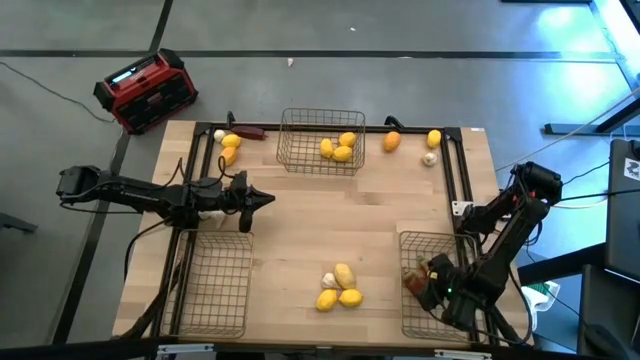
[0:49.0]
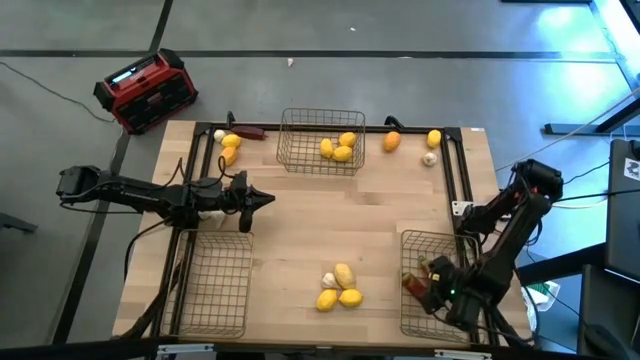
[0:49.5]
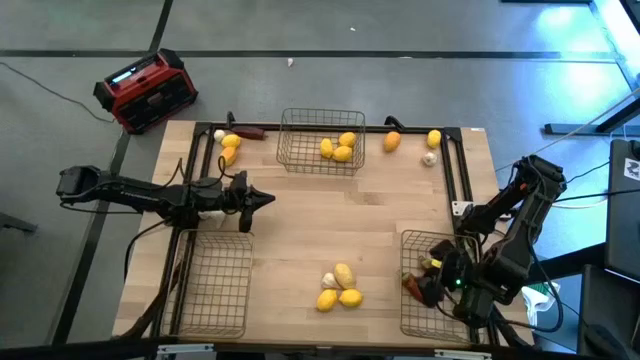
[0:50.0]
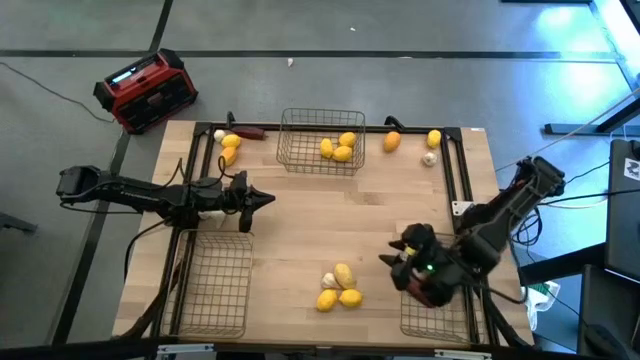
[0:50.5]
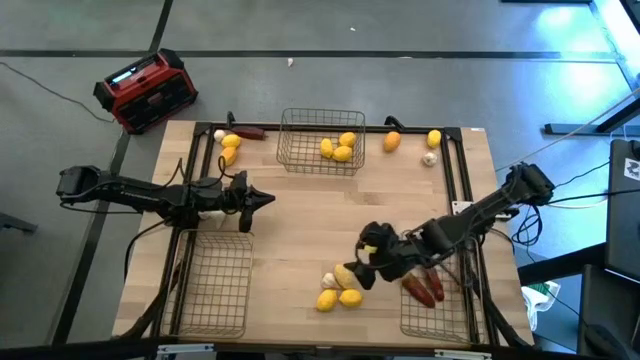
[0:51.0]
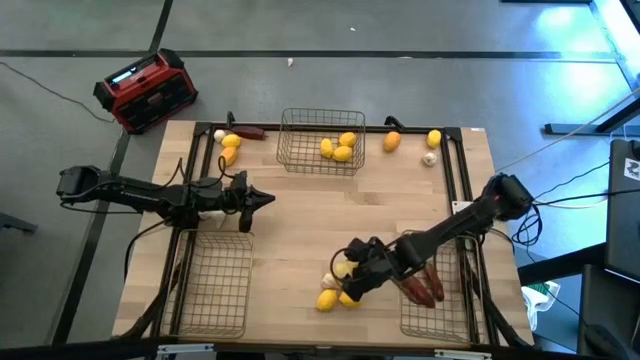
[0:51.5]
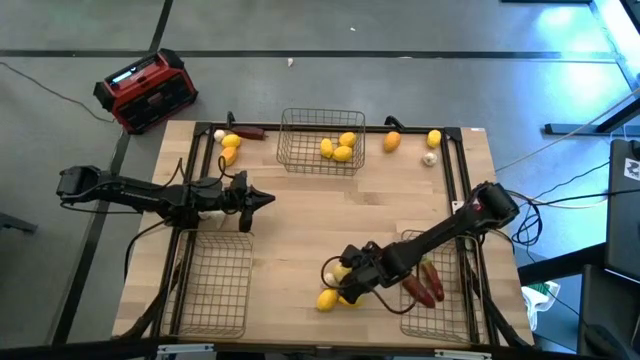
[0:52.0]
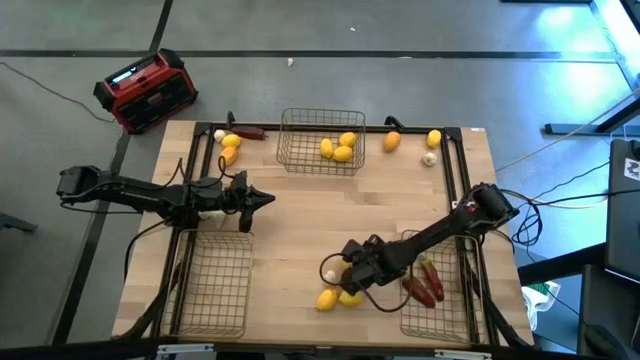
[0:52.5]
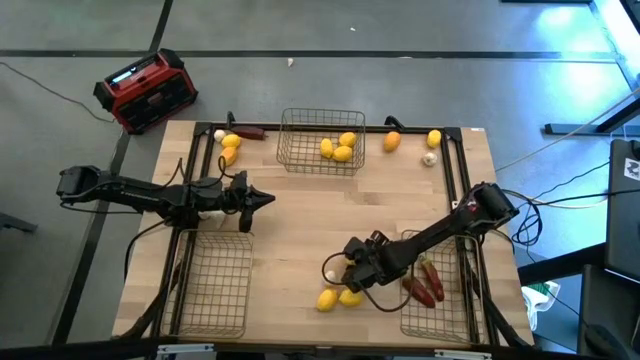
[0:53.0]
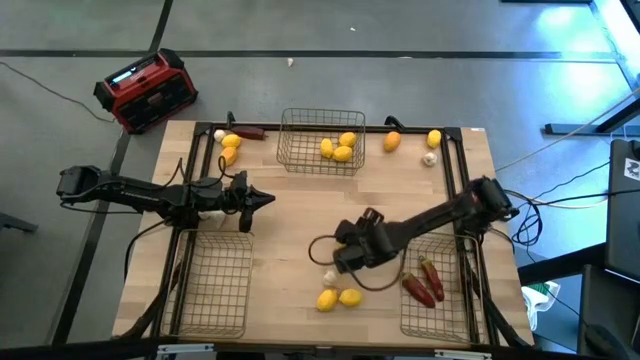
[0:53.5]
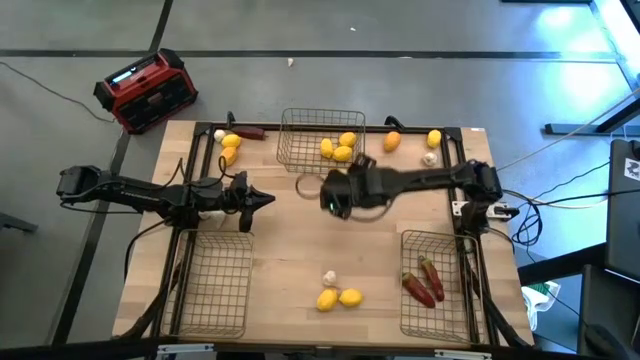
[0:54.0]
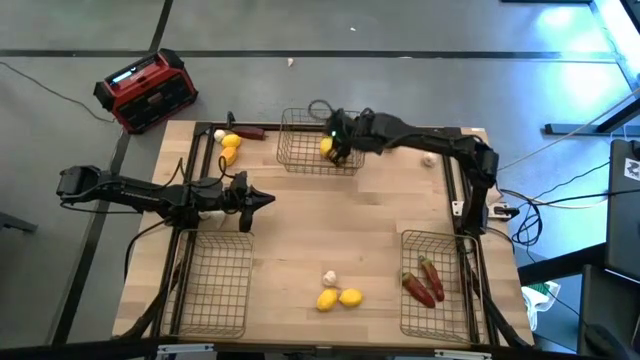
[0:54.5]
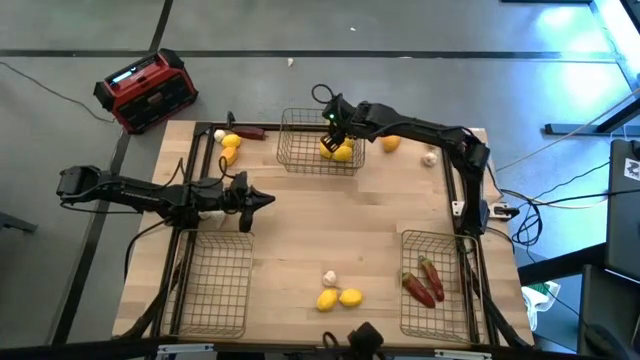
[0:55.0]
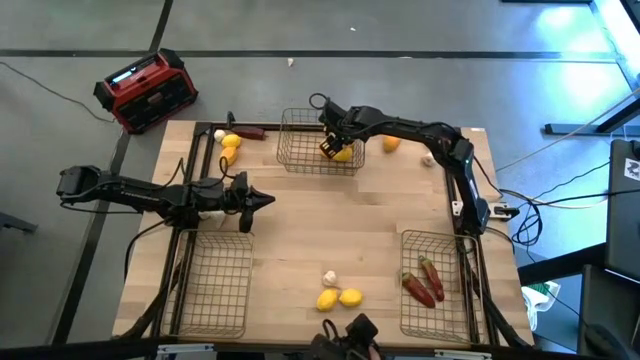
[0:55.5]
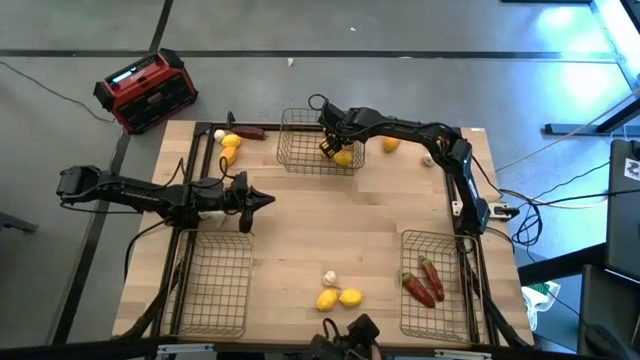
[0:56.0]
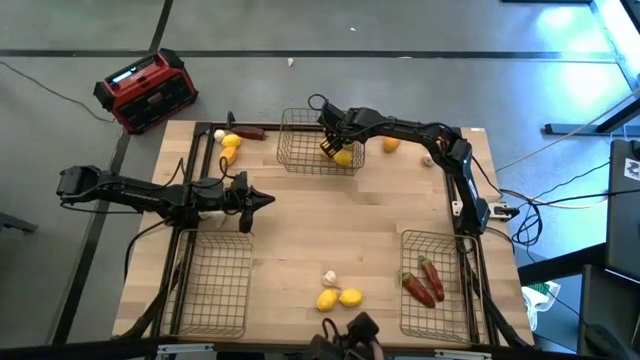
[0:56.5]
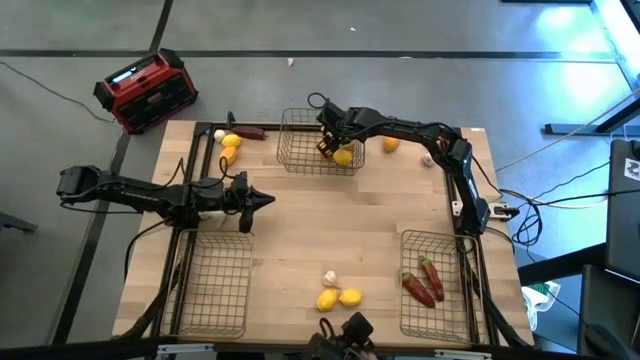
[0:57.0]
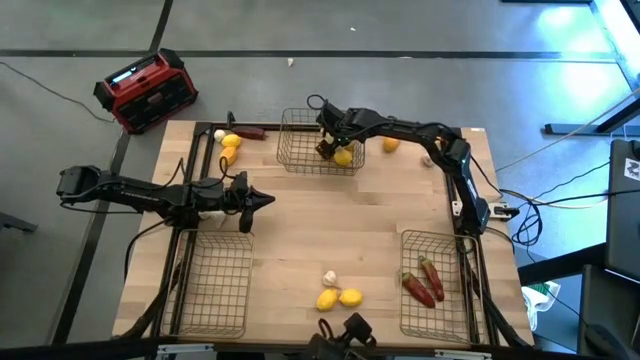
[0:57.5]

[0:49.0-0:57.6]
Task: Sort produce into baskets
Put the lemon into the top wire basket

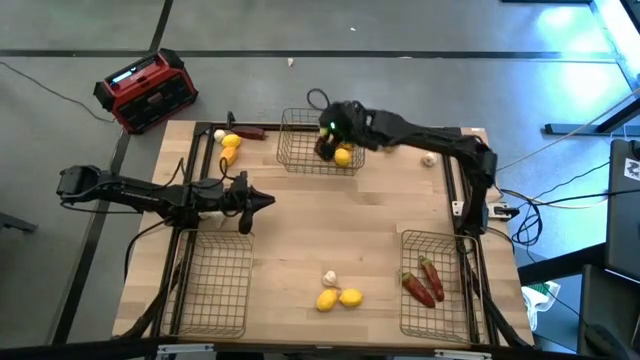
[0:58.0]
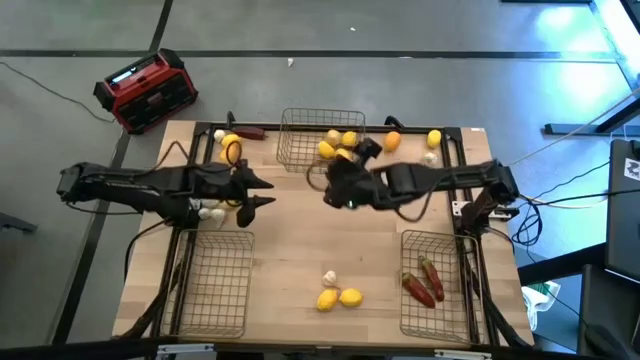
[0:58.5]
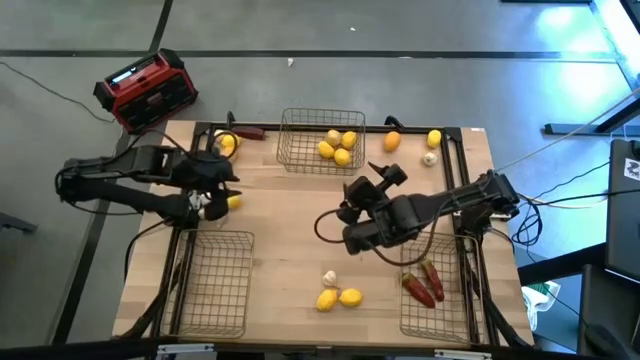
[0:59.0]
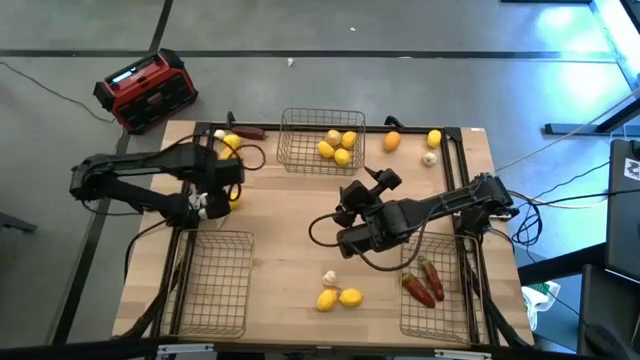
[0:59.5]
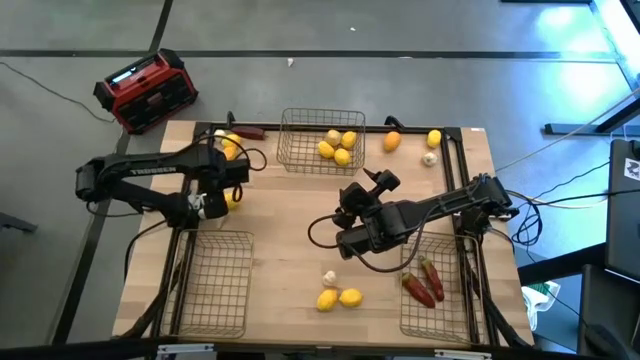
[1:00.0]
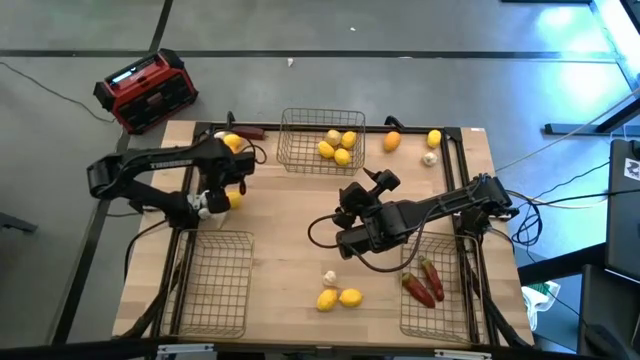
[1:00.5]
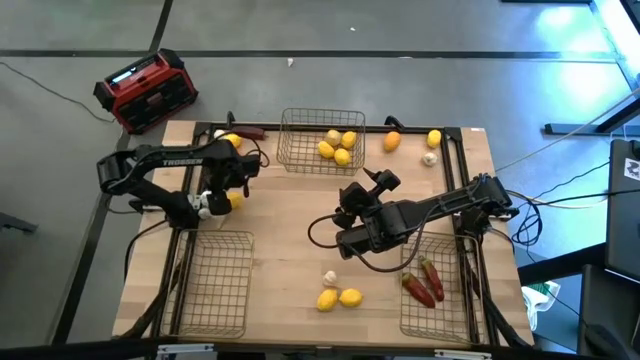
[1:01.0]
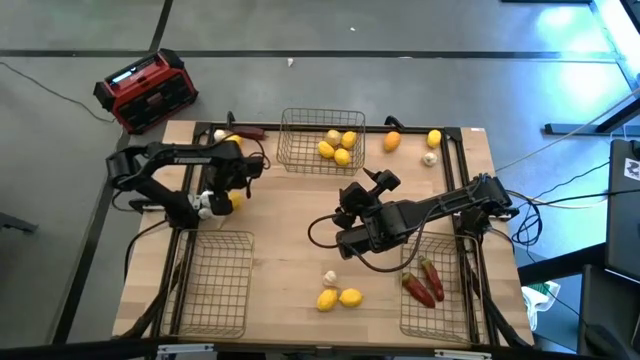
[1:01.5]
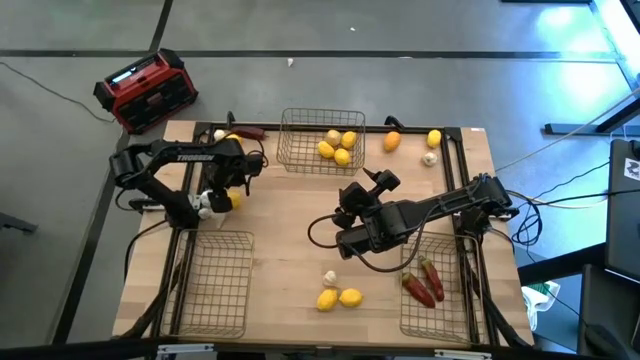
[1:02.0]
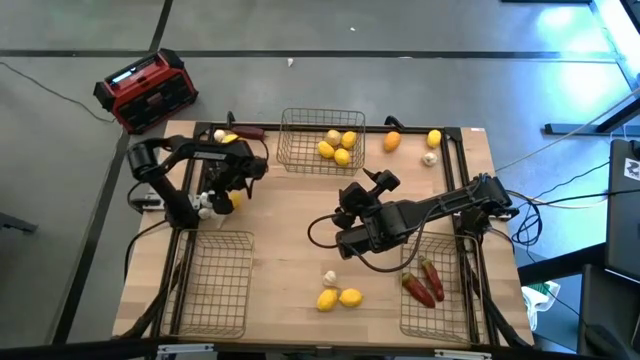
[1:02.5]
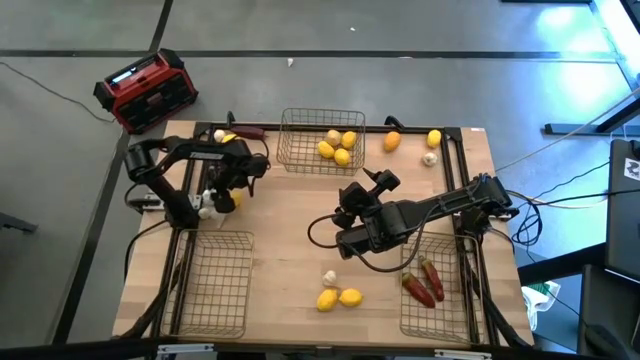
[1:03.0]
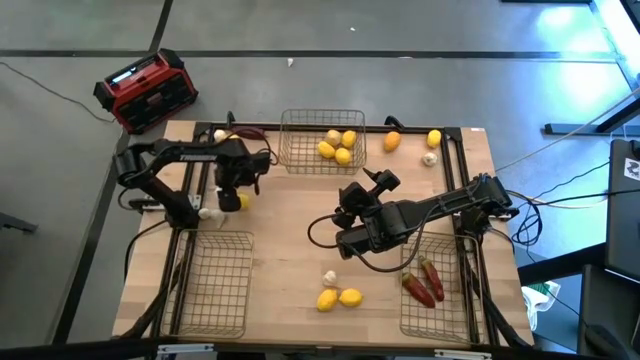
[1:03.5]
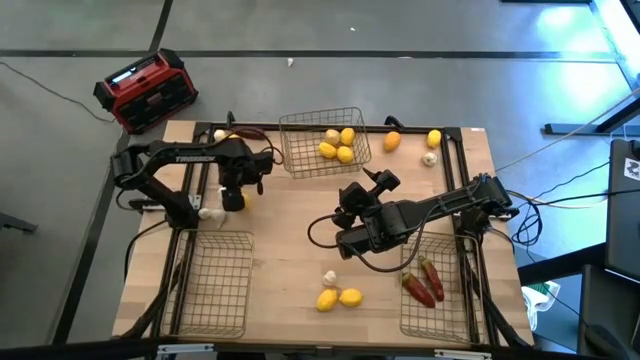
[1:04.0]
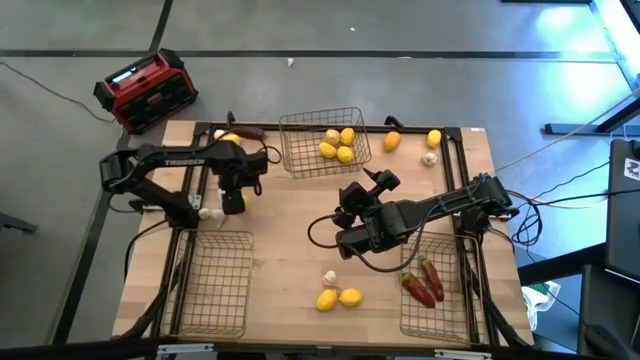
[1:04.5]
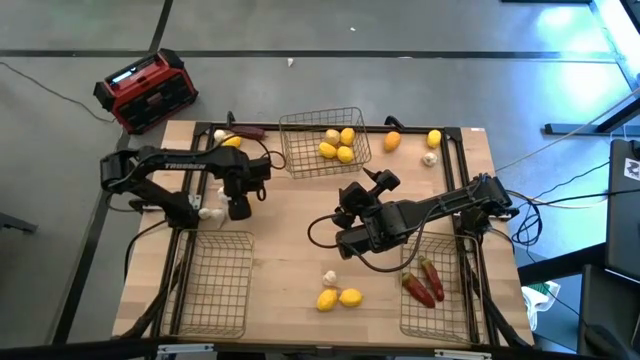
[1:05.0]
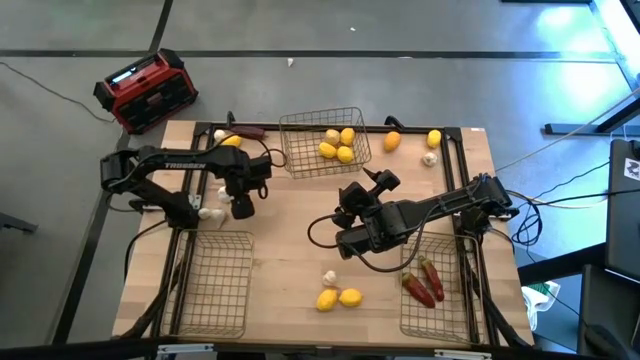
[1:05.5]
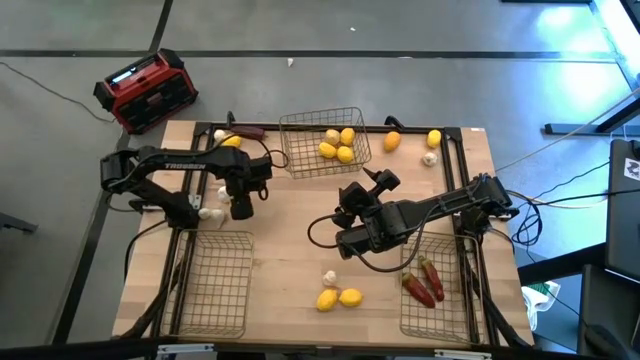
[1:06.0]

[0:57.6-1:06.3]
Put the lemon into the top wire basket

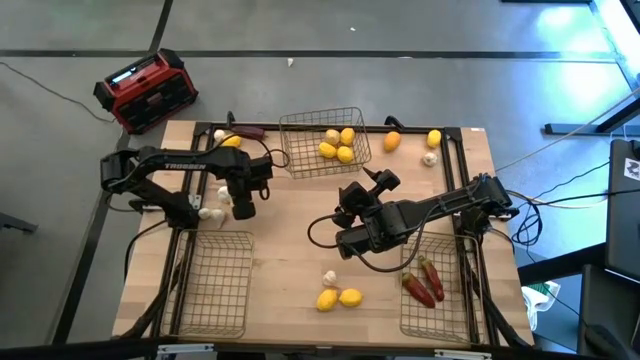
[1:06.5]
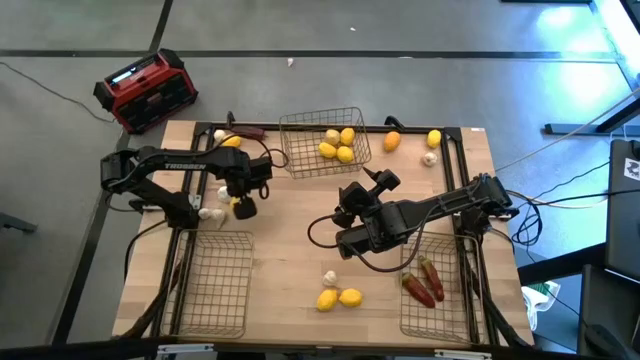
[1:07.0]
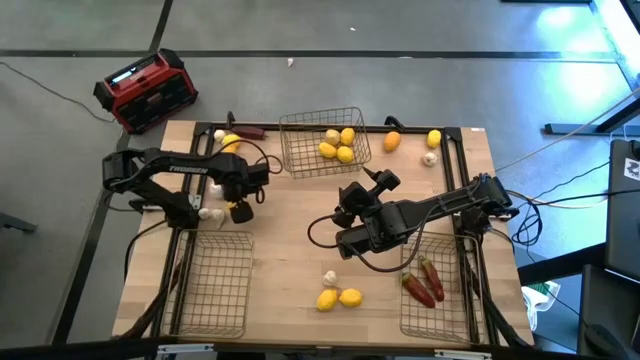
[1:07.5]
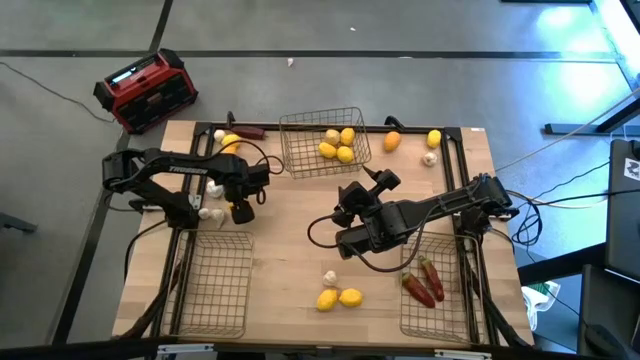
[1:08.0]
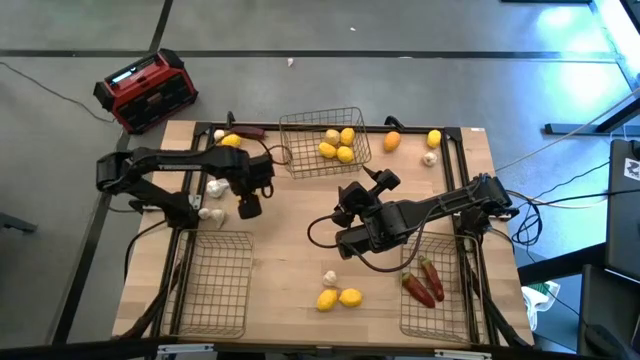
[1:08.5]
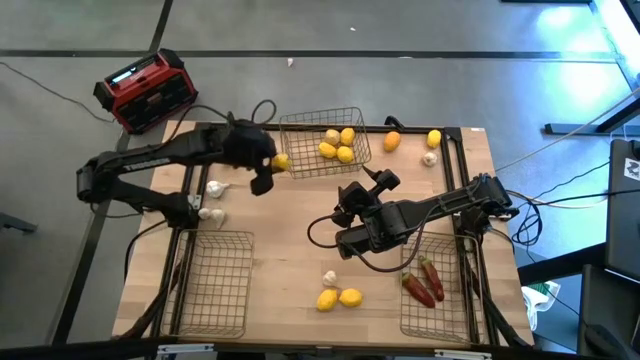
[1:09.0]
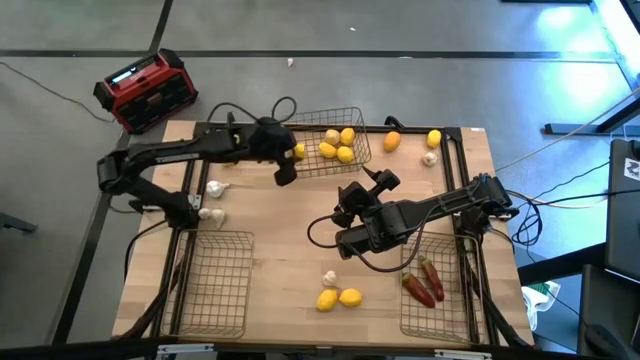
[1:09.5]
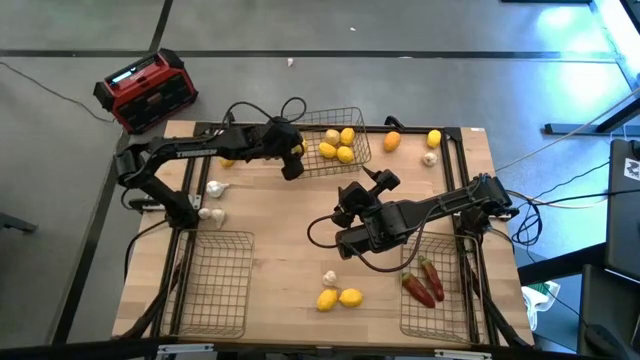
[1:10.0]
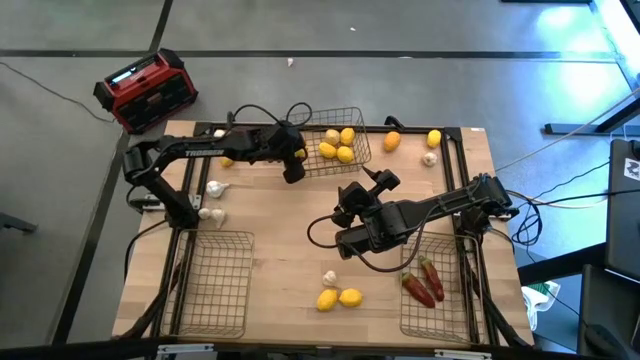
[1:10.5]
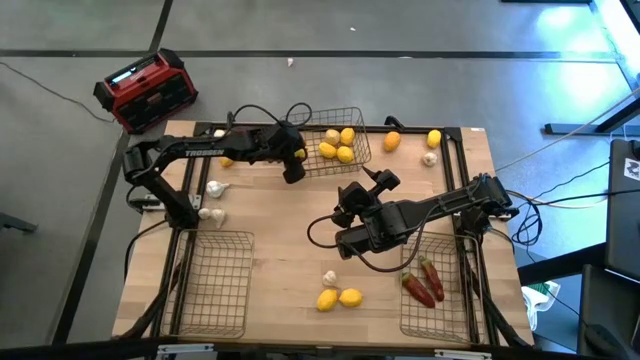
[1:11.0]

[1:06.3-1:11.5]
Put the lemon into the top wire basket
